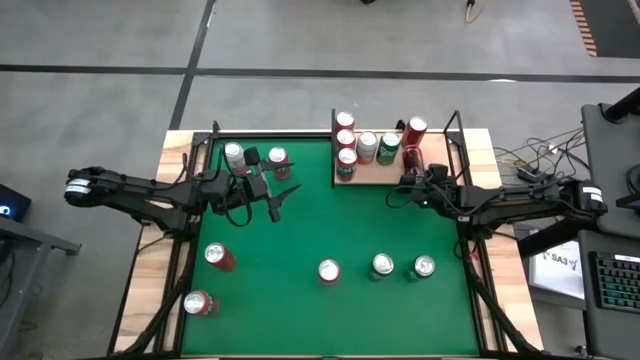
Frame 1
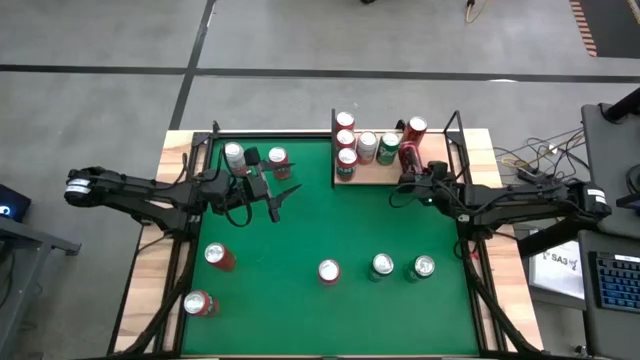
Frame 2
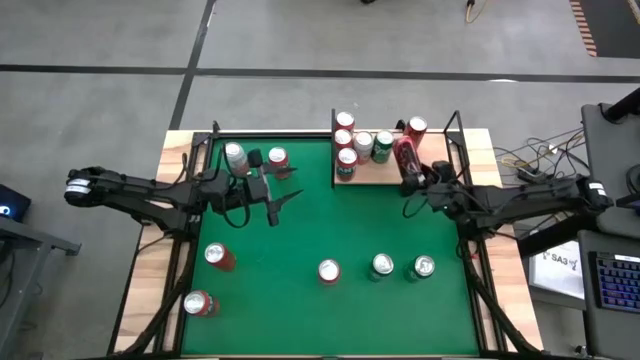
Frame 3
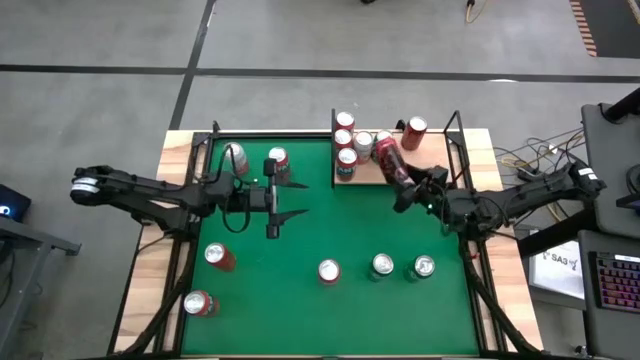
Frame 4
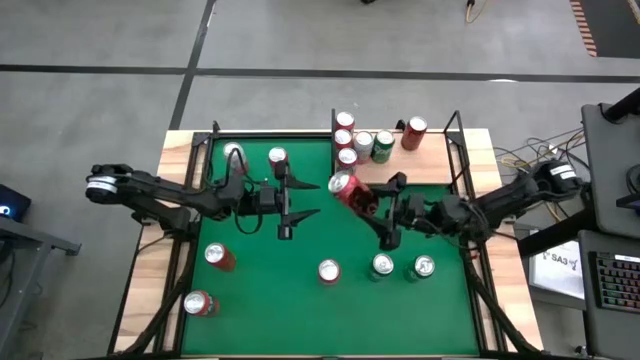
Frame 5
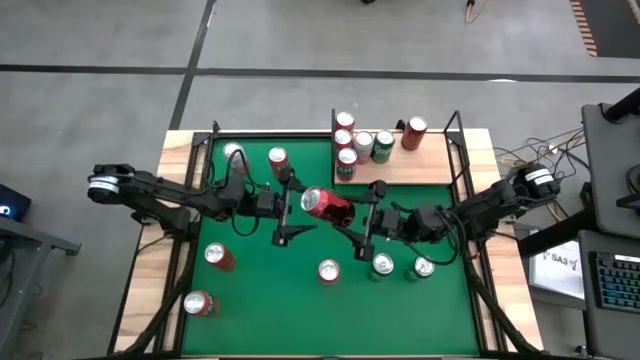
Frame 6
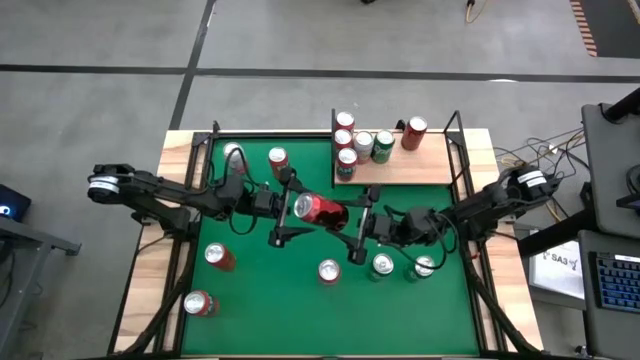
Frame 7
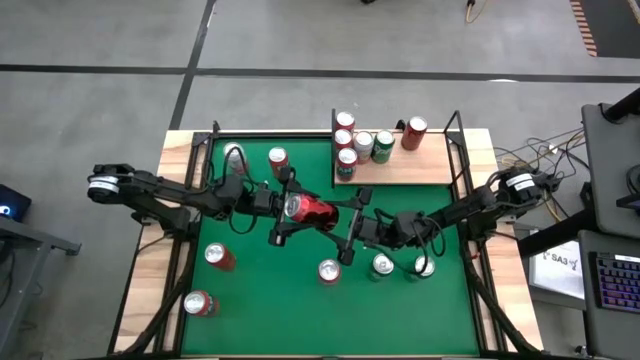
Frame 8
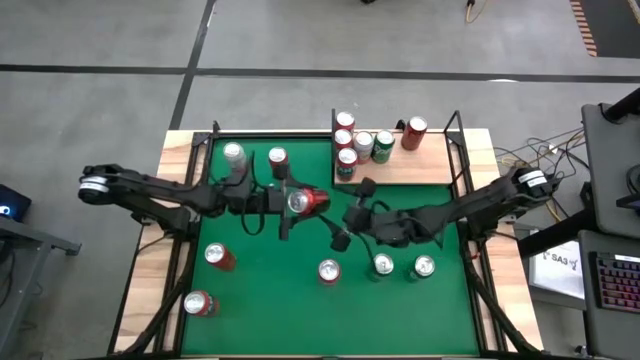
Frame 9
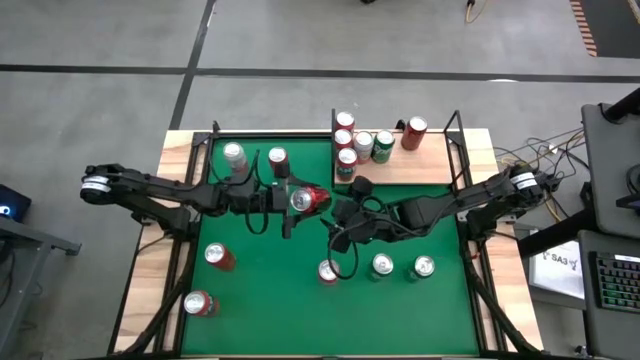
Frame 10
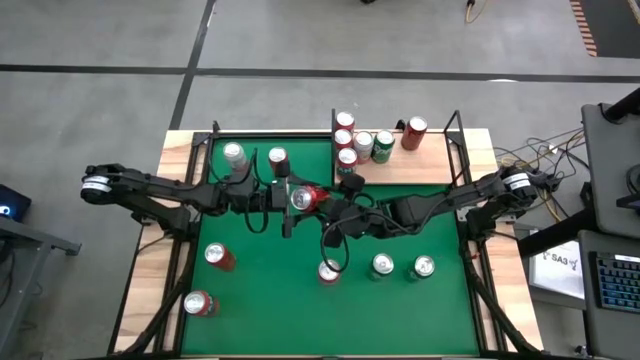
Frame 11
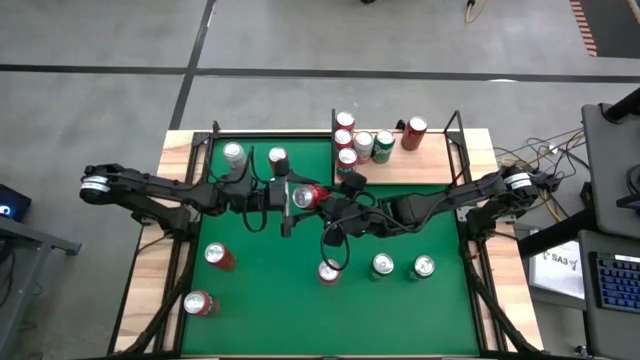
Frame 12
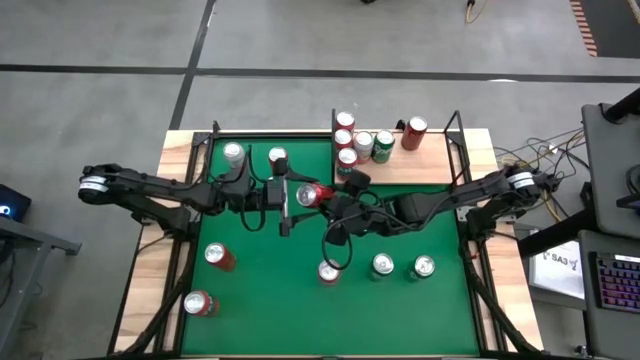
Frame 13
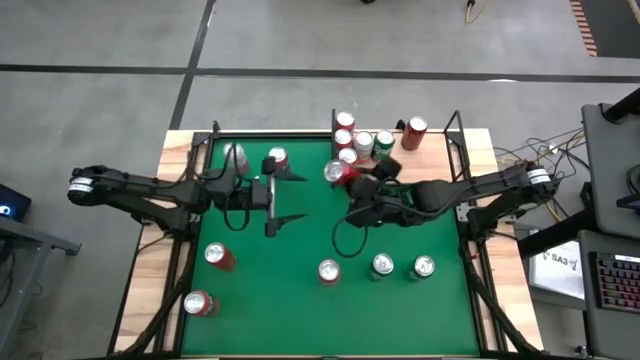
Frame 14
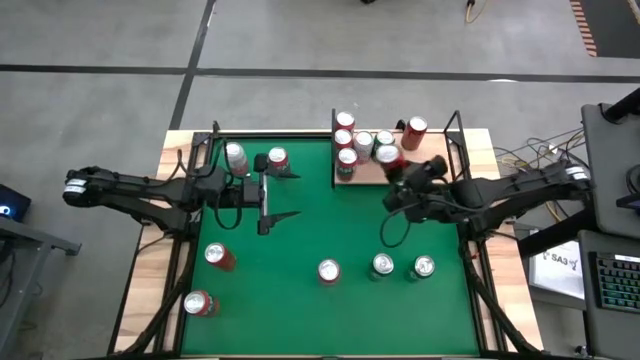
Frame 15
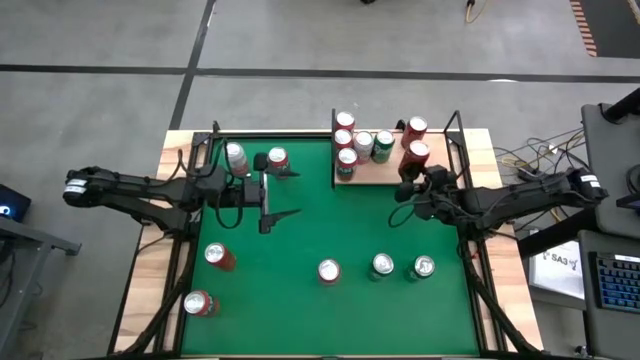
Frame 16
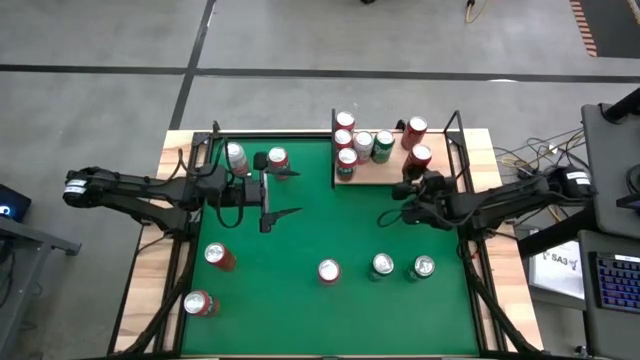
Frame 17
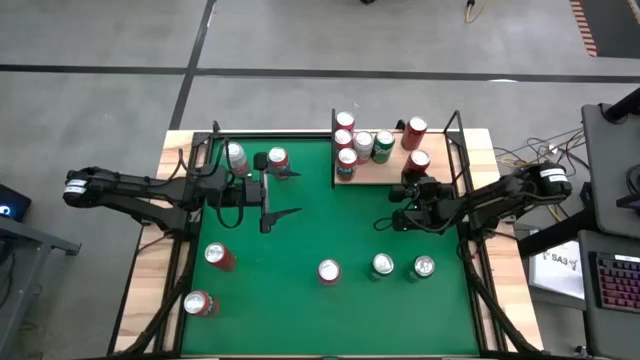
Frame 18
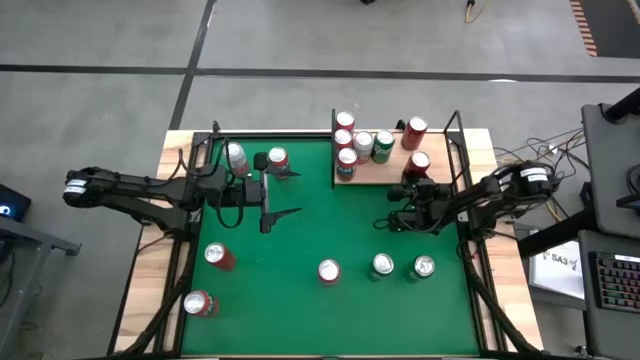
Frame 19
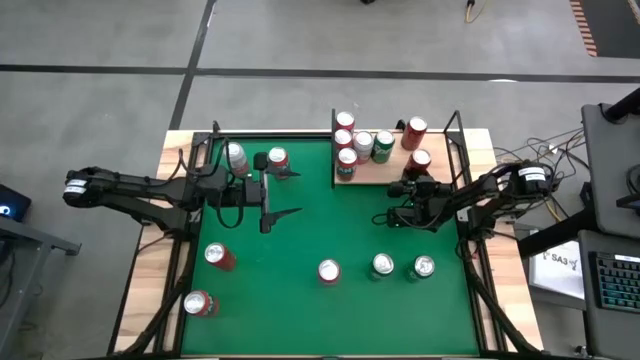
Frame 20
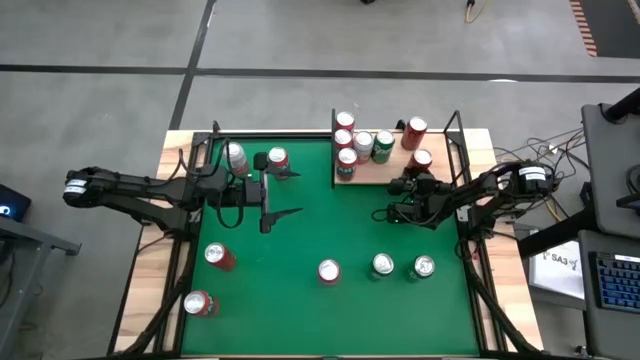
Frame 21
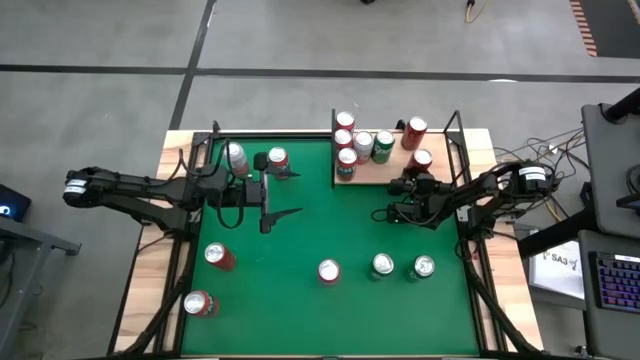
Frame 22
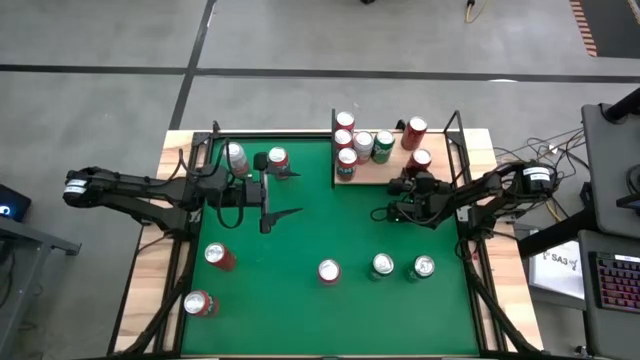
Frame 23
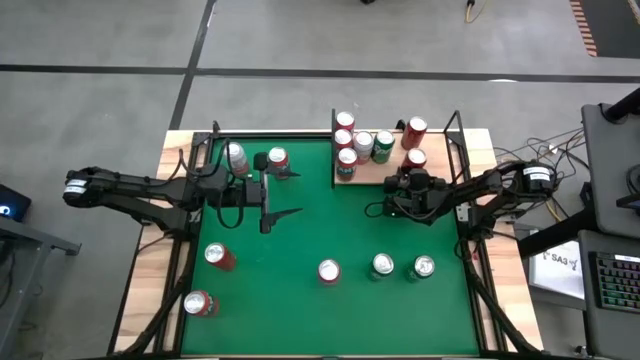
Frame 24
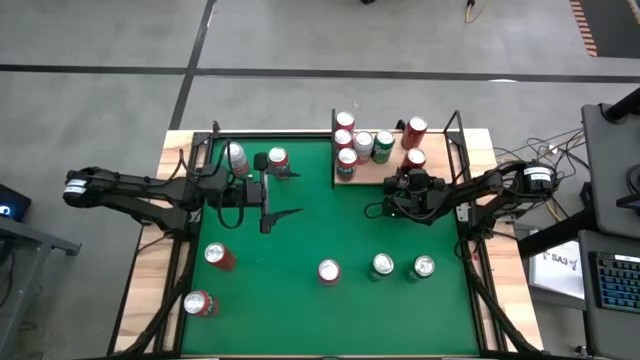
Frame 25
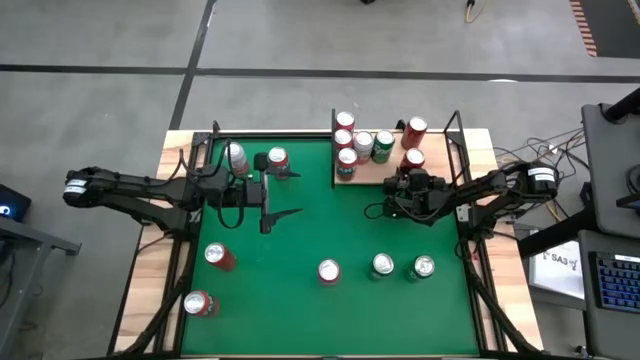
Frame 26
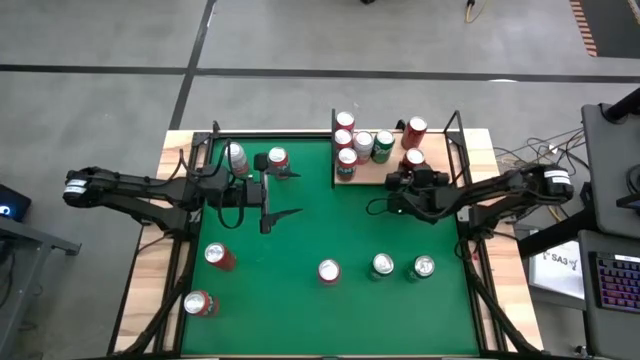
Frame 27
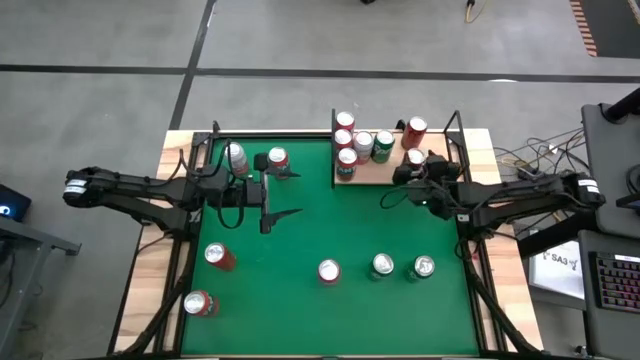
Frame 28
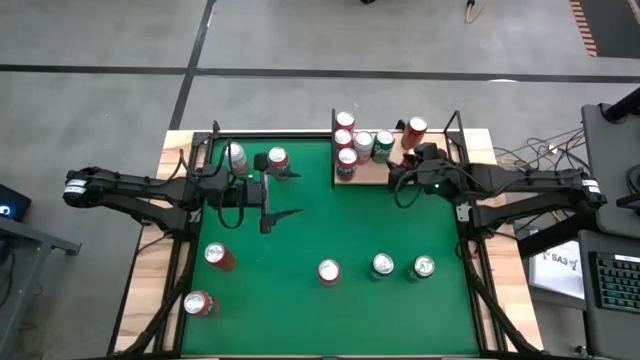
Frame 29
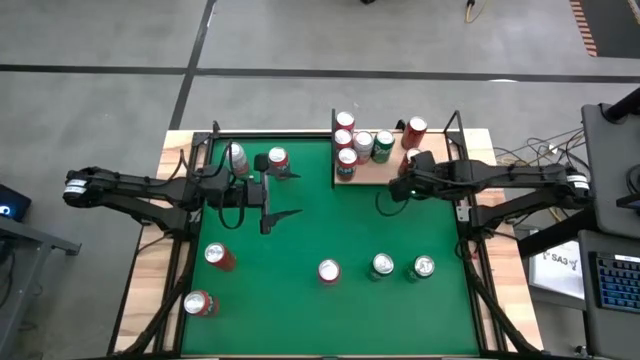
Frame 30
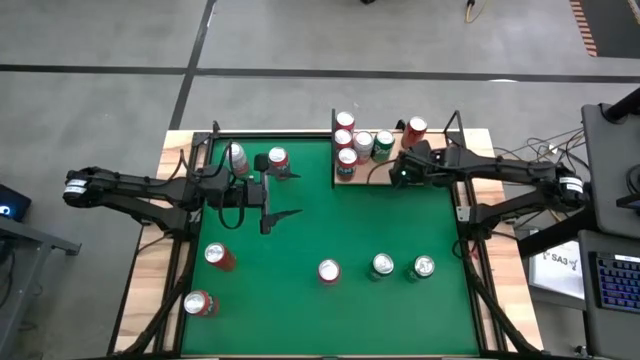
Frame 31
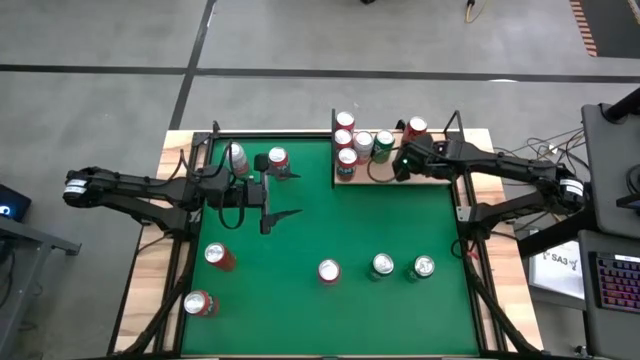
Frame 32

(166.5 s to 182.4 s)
Task: Place canned beverage on shelf
Put the bottom red/black soda can on the shelf aligned with the other red/black soda can

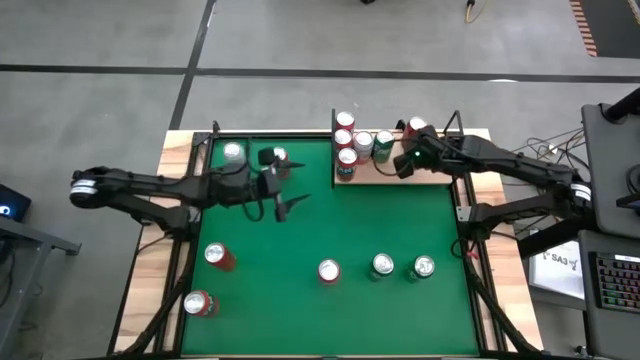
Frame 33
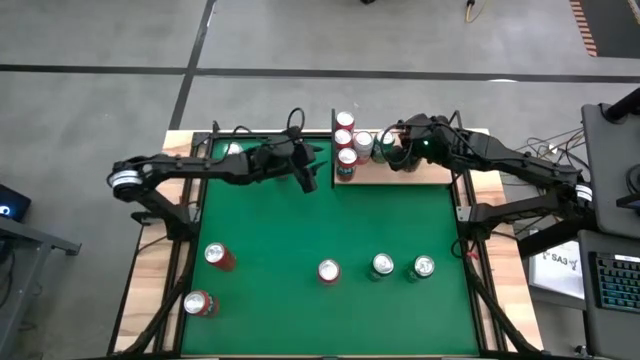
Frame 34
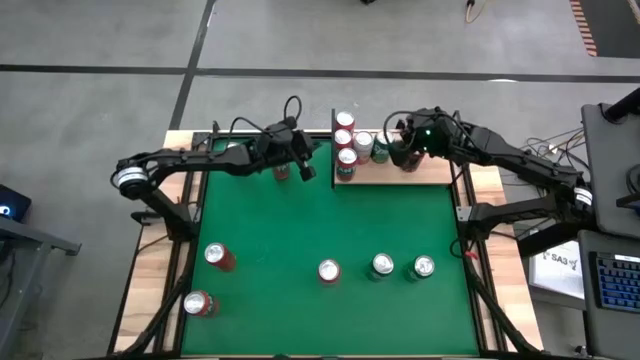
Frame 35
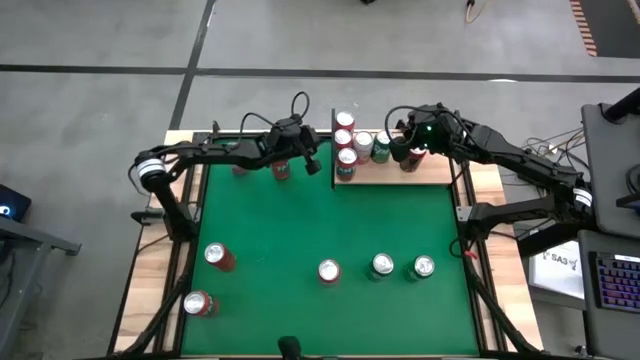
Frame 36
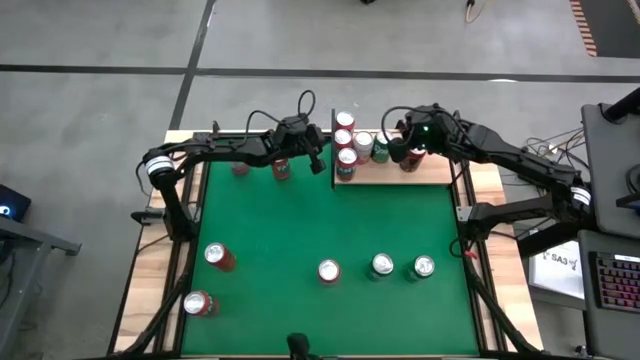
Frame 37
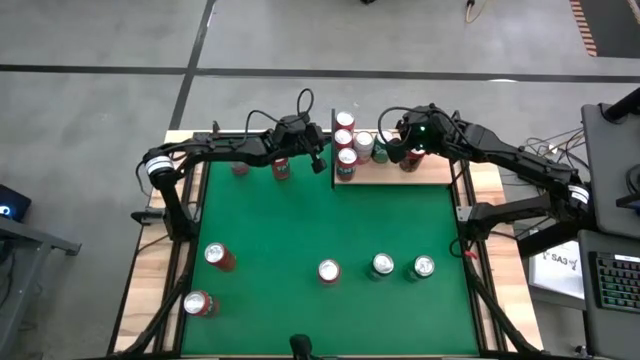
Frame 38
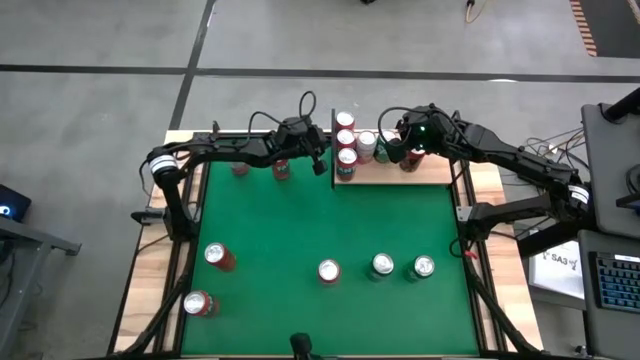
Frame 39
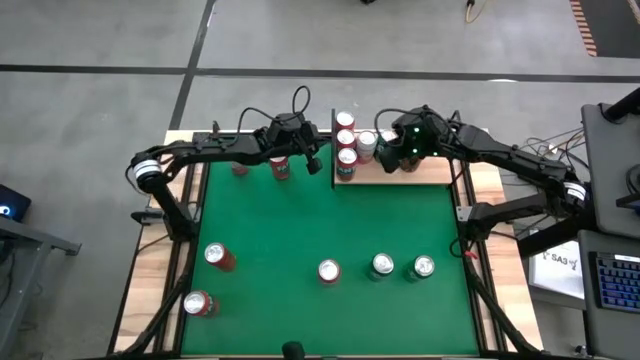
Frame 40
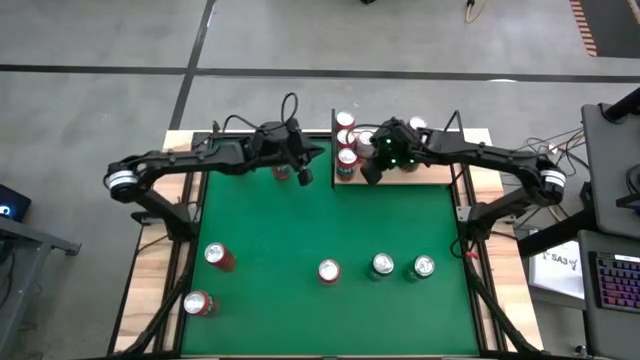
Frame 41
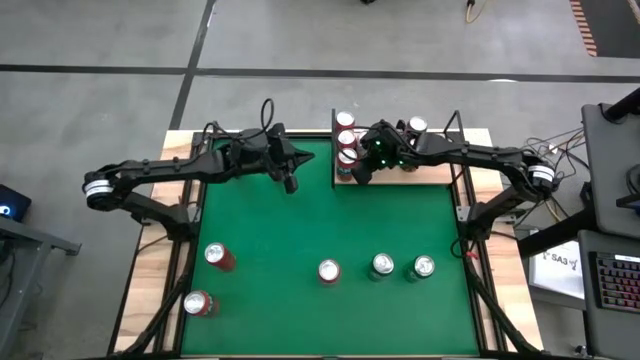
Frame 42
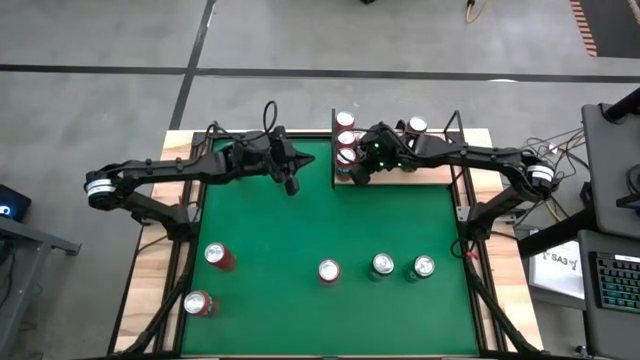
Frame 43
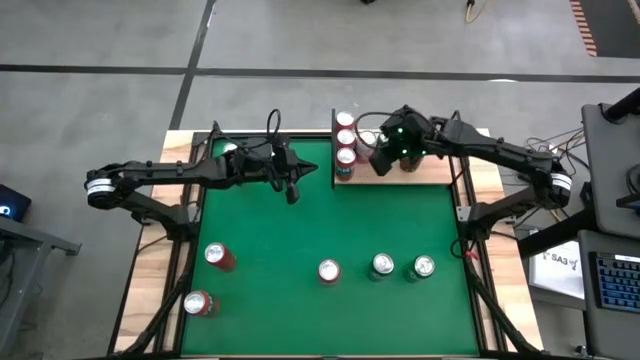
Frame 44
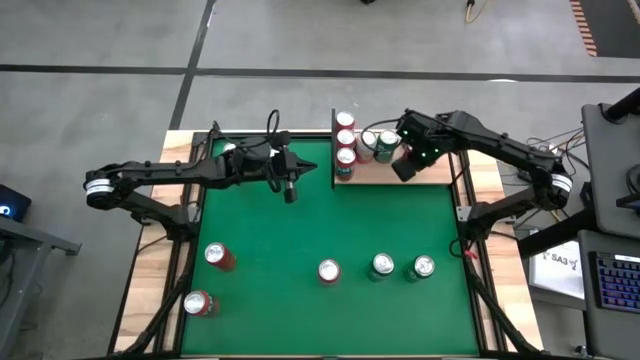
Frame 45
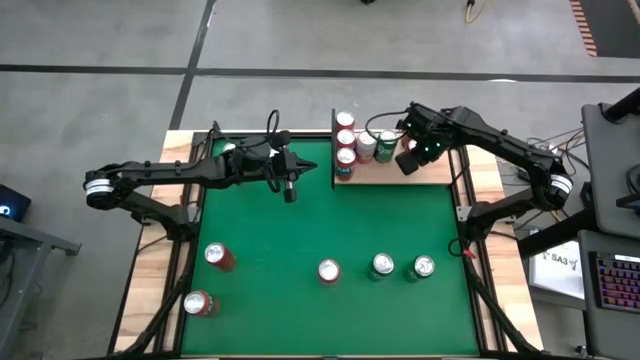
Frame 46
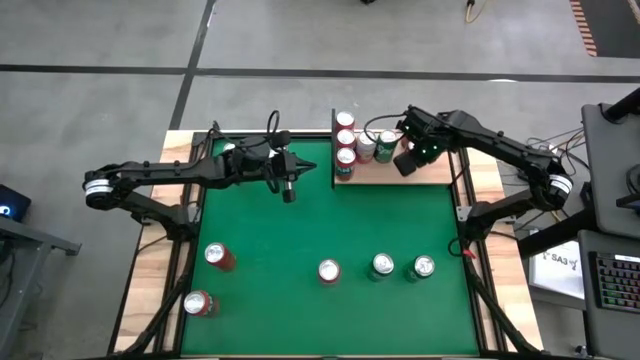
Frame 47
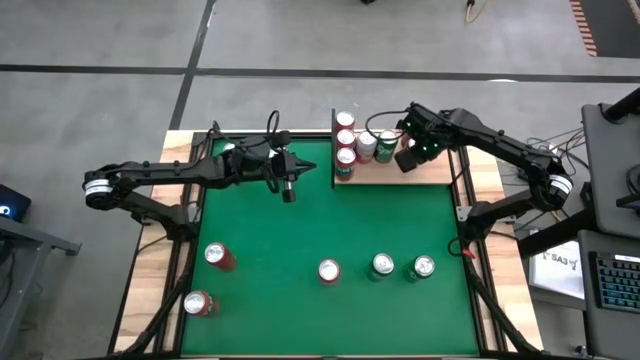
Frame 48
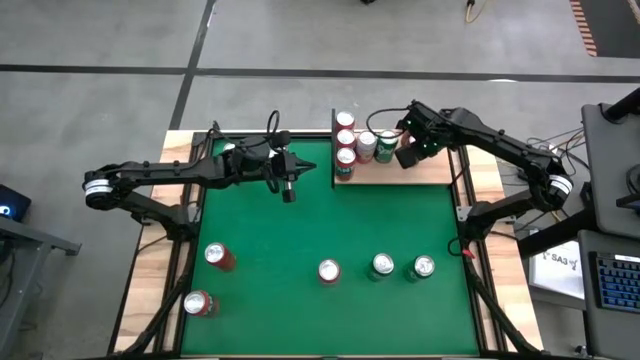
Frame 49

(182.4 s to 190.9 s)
Adjust the soda cans on the shelf
